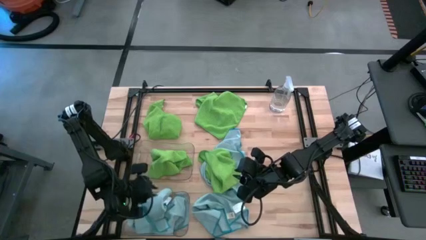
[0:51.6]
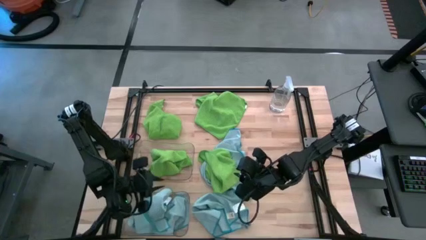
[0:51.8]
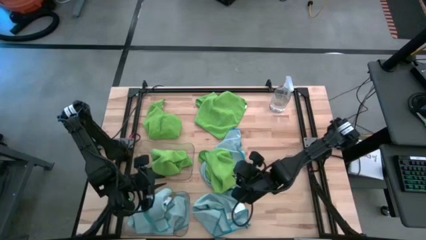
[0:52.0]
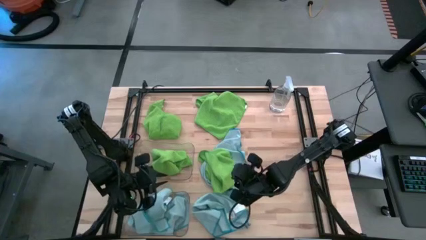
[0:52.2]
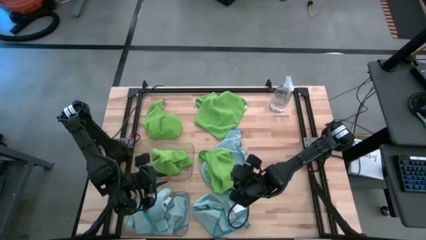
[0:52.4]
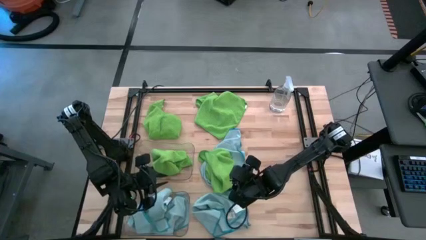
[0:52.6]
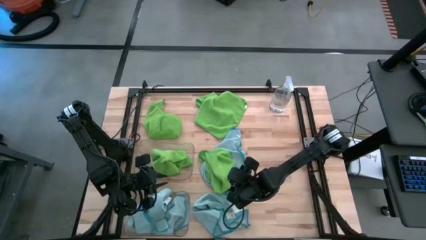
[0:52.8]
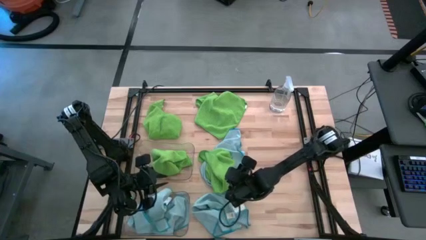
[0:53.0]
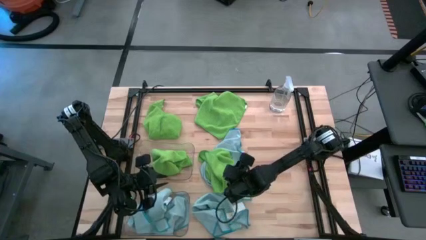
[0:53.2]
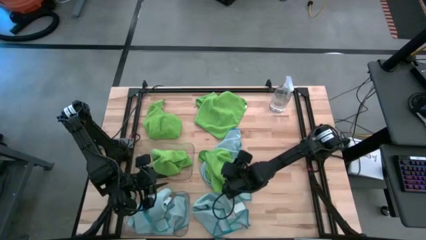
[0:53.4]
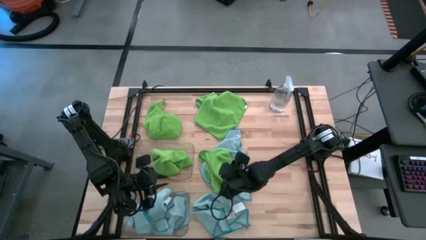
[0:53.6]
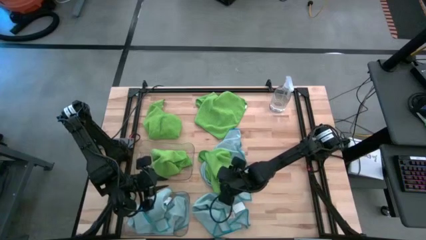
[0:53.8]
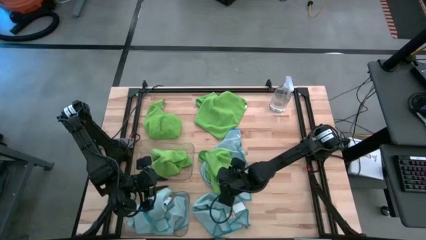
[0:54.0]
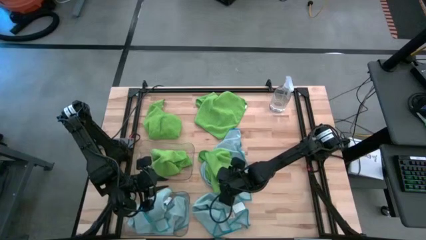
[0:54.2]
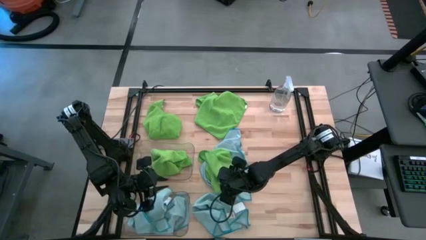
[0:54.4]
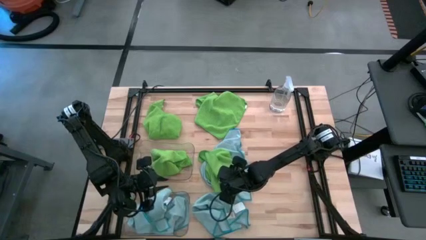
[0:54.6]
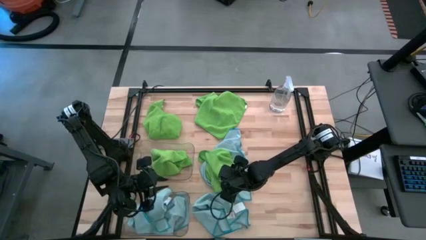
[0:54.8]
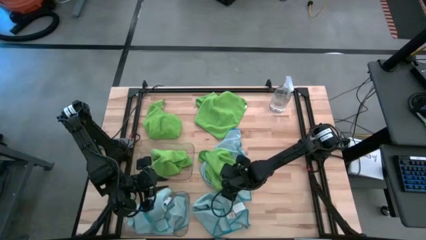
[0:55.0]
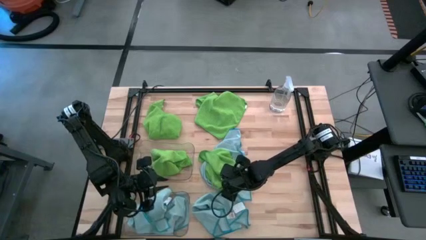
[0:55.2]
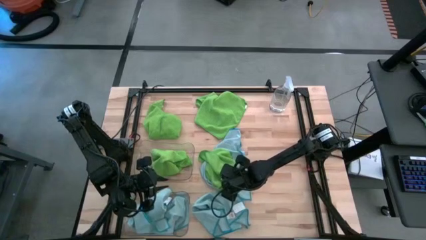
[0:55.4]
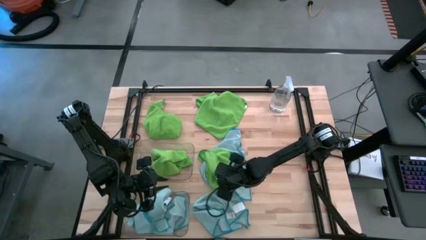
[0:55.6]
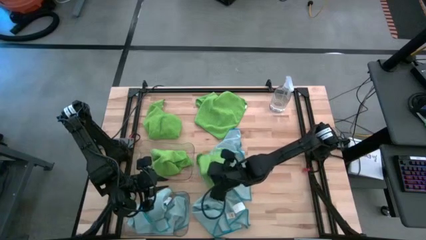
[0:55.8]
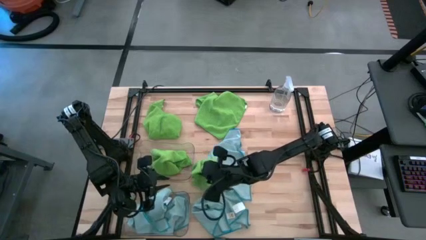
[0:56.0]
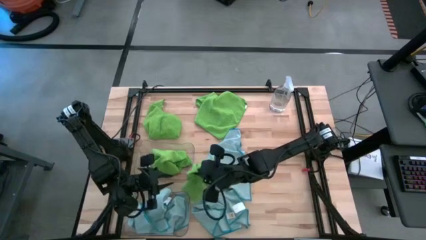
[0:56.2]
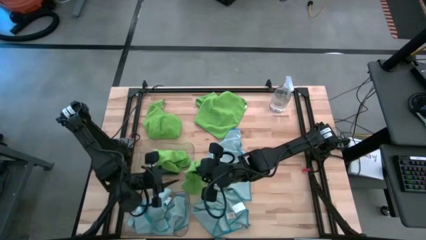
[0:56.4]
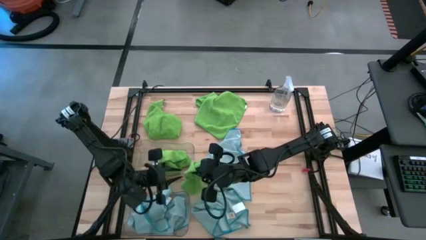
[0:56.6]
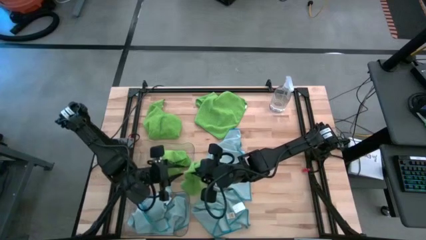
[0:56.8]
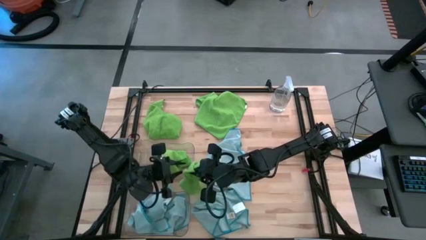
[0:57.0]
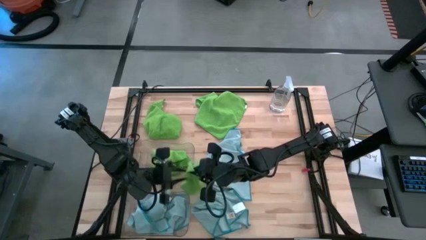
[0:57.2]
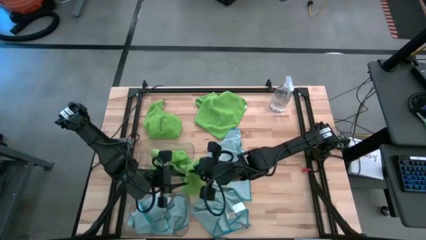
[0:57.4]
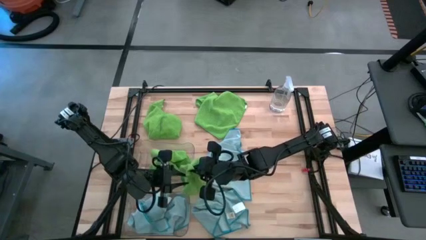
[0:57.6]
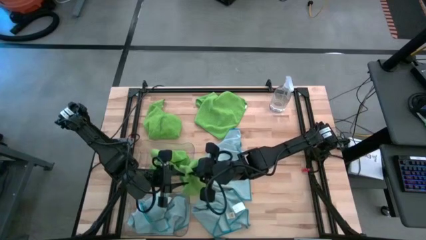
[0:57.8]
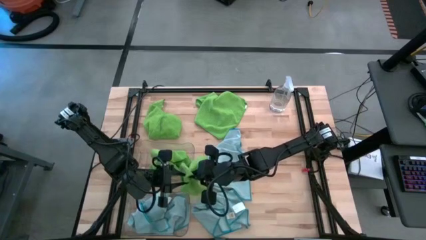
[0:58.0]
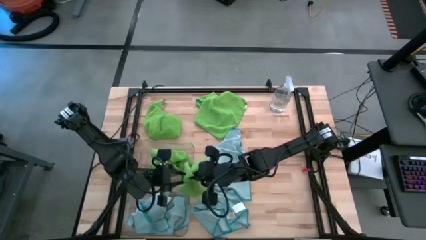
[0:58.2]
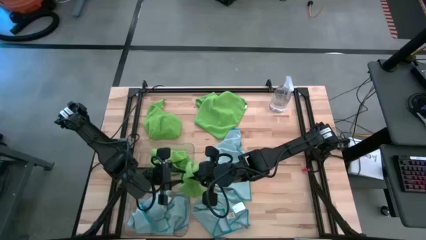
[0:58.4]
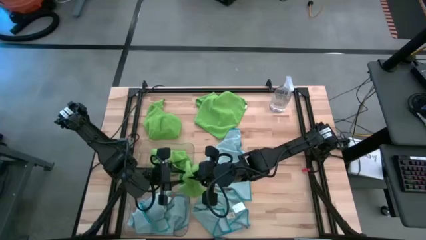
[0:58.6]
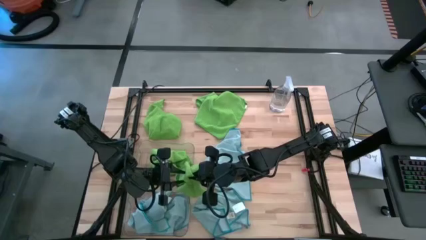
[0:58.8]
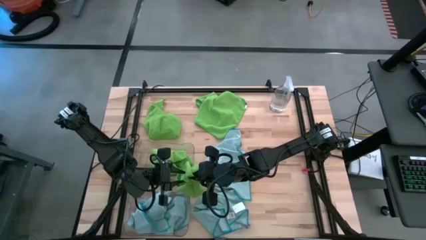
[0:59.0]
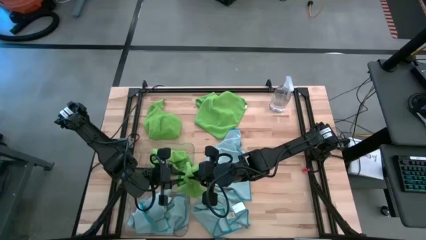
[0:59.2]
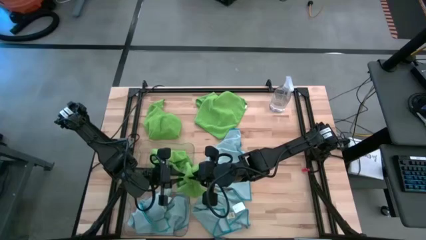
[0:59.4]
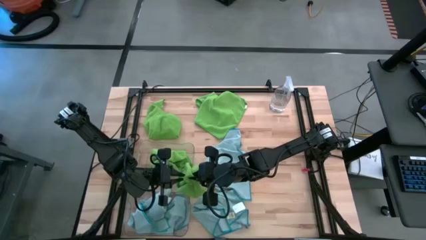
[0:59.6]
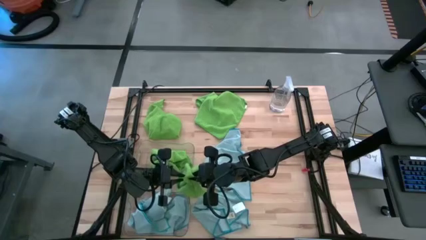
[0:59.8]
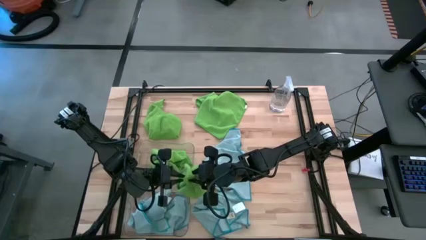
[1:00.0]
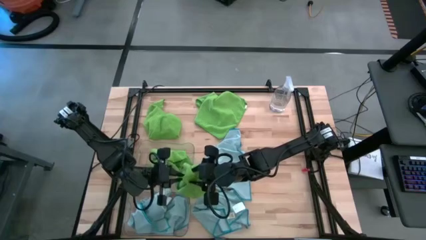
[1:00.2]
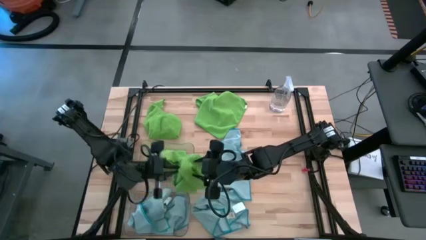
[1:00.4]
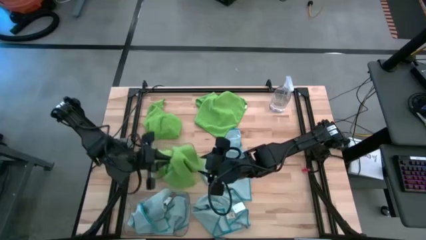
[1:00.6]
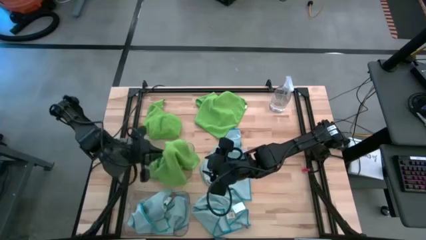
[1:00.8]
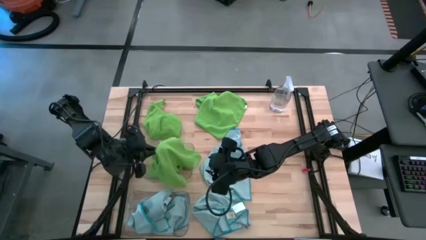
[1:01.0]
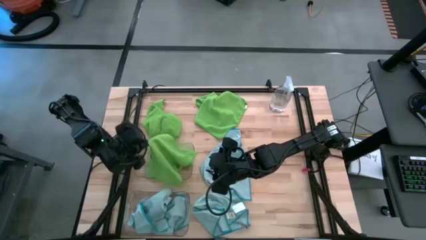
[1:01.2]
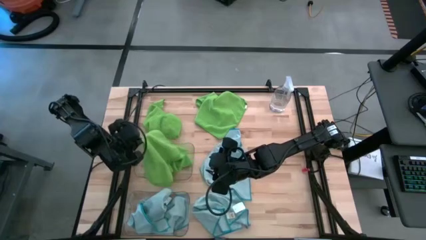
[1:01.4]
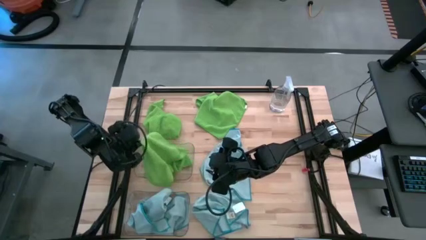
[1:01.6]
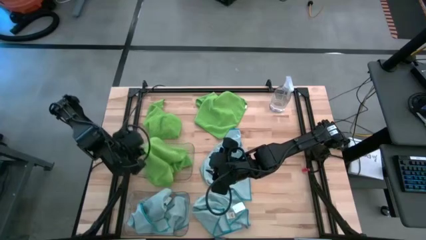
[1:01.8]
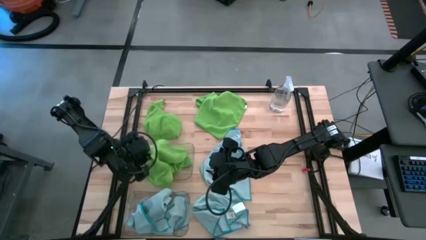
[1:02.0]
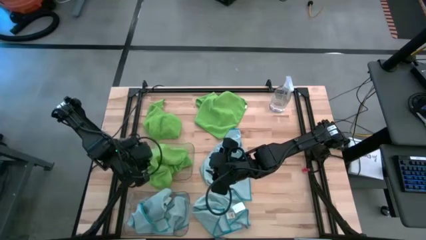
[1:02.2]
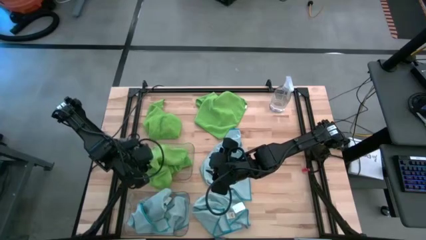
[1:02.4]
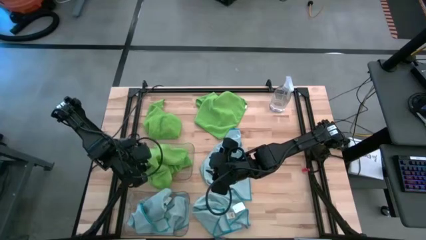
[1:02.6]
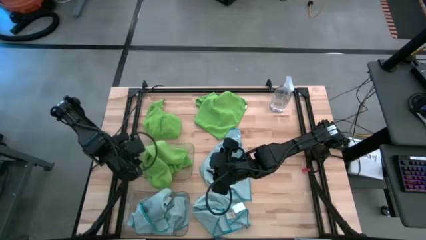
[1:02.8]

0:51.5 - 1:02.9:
Task: Sort microfiber towel by color & place in baskets
Put the bottom green microfiber cloth into the top transparent bin

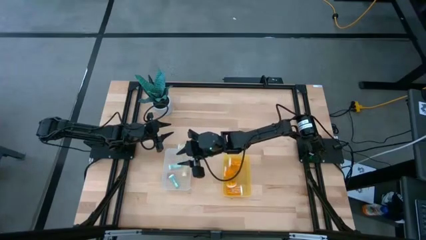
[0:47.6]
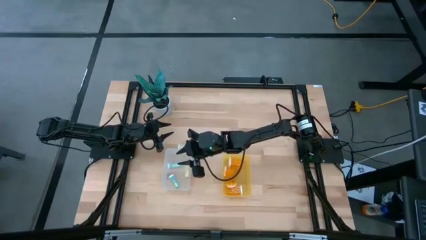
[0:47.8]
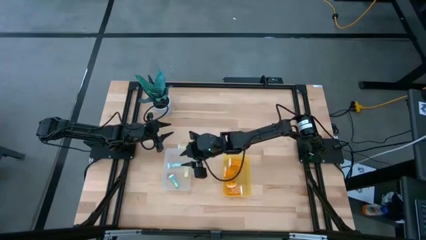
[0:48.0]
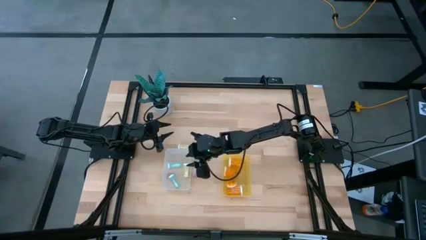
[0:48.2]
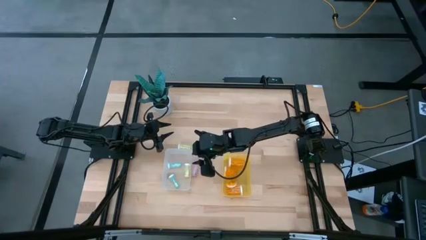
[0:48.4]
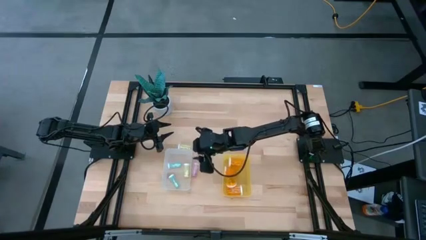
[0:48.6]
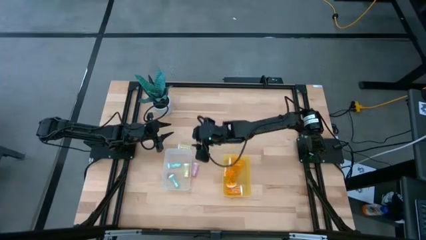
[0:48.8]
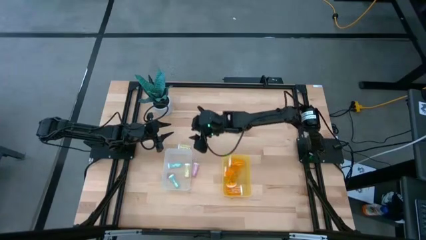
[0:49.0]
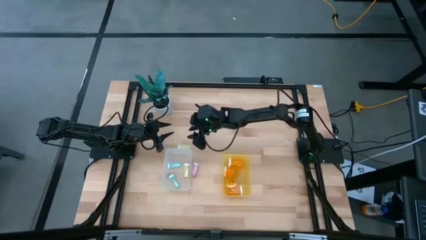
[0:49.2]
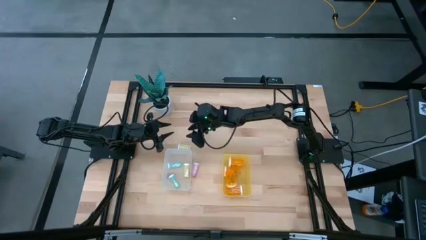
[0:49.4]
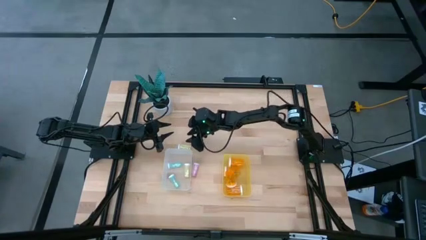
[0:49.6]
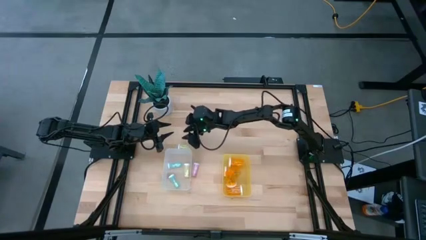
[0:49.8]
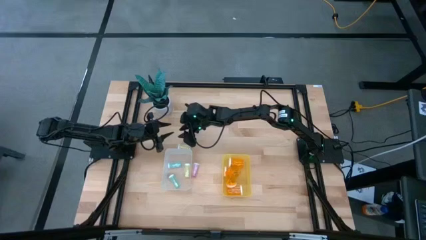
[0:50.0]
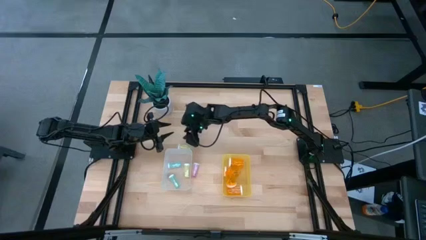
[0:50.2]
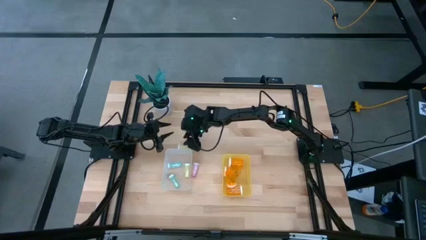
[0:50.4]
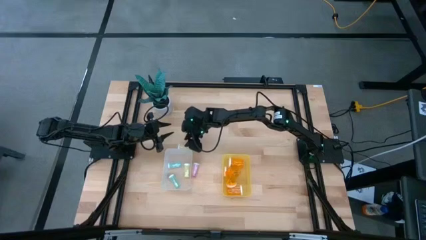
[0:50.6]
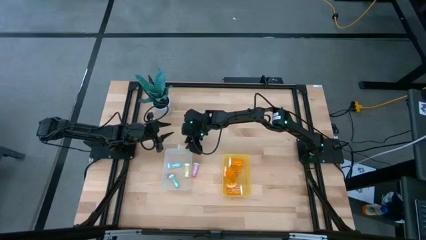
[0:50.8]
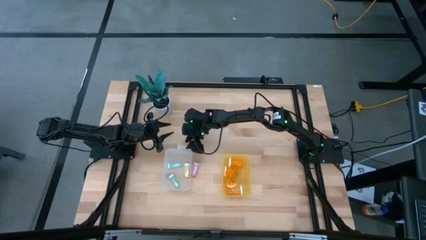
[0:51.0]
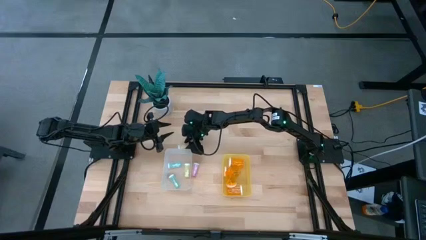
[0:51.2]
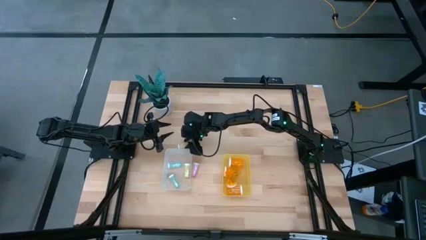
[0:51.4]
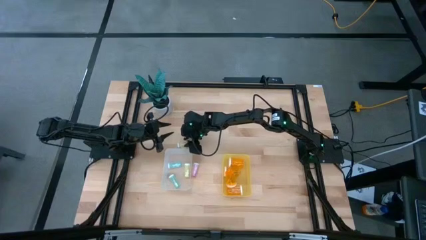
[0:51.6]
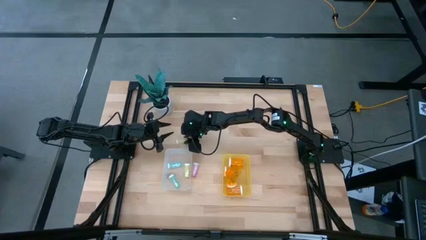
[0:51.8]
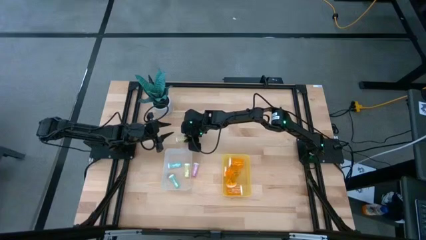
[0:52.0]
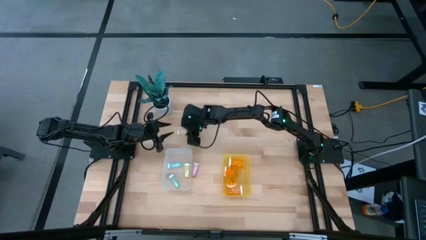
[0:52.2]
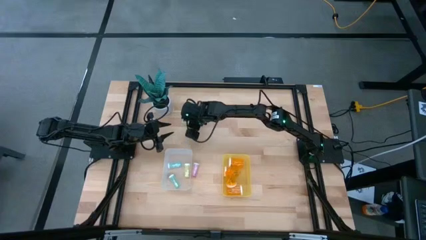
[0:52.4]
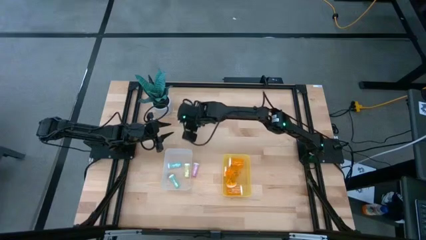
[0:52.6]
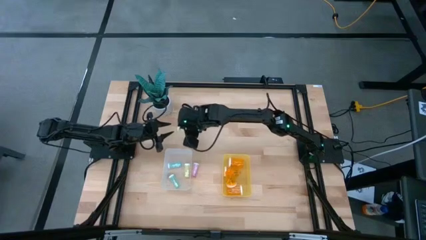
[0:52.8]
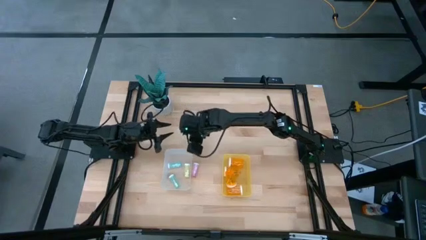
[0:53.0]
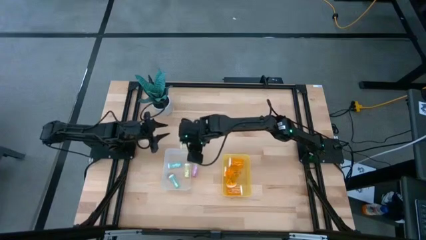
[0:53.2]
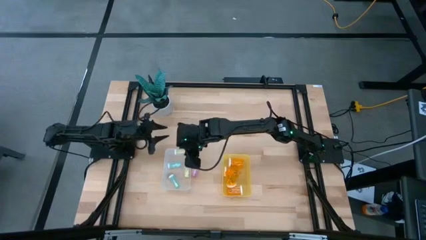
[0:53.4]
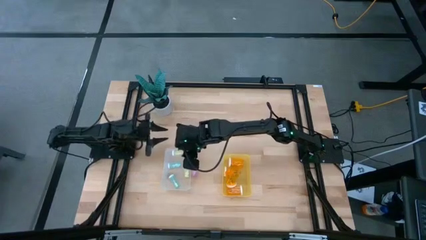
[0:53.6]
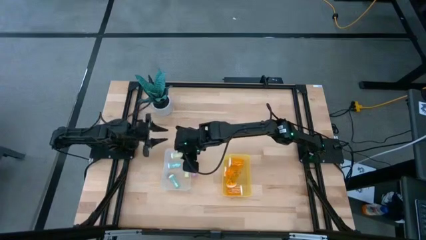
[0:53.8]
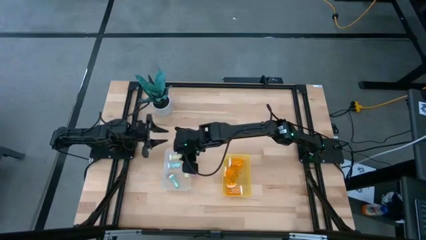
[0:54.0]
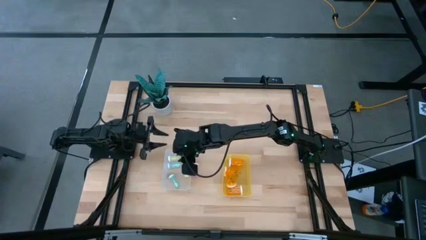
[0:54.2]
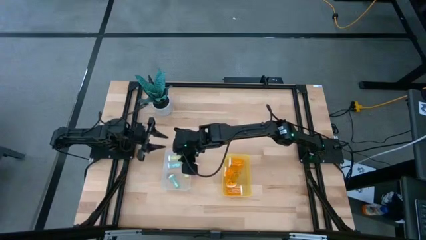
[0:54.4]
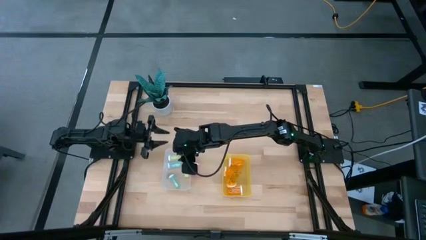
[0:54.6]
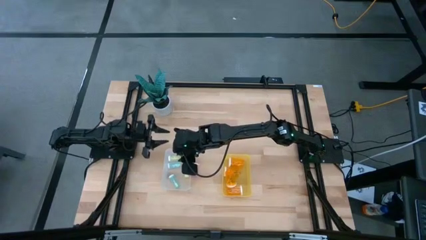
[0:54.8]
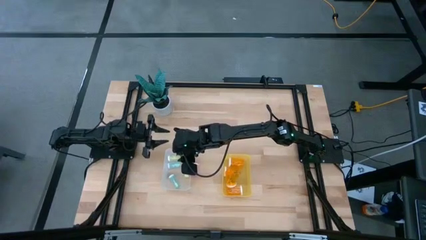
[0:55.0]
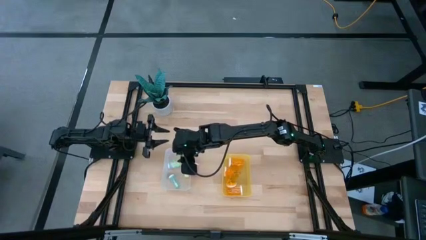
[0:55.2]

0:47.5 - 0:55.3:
Task: Pick and place medicine bottles into bin by pill shape (circle, oval)
Put the yellow pill bottle into the transparent bin
